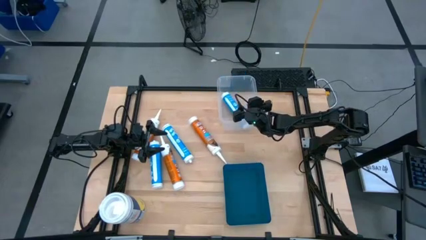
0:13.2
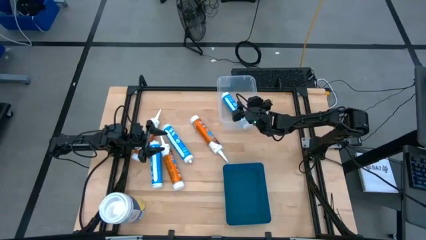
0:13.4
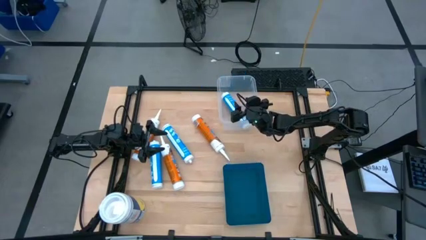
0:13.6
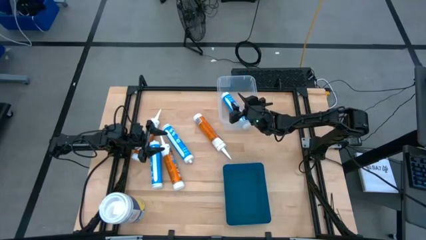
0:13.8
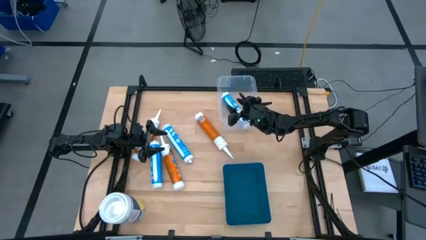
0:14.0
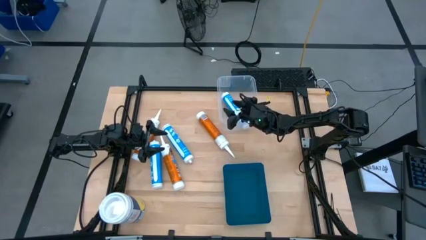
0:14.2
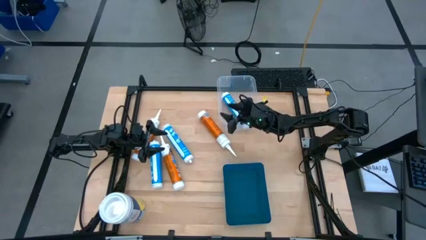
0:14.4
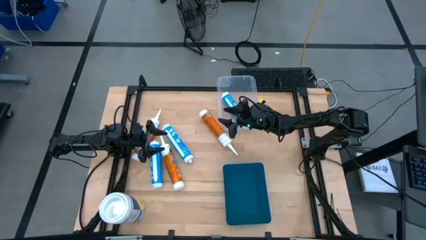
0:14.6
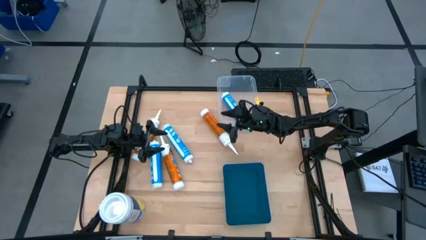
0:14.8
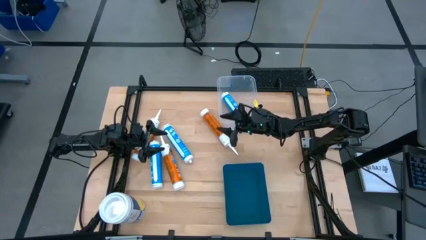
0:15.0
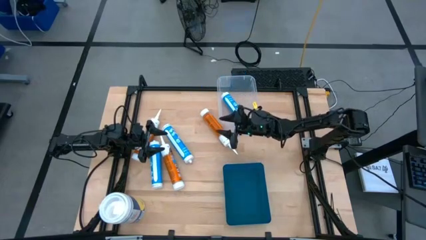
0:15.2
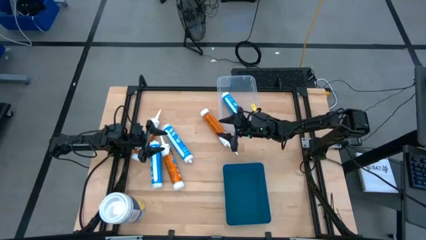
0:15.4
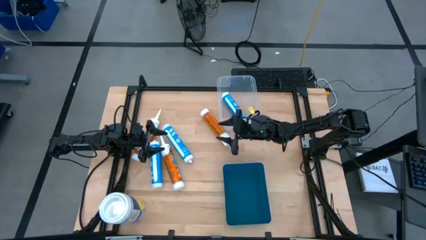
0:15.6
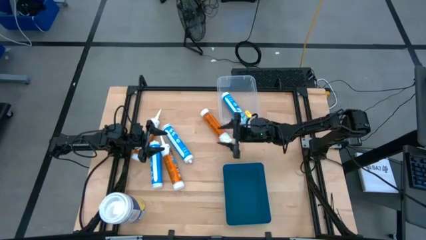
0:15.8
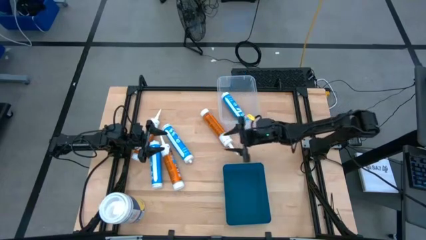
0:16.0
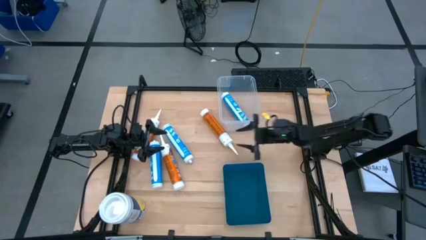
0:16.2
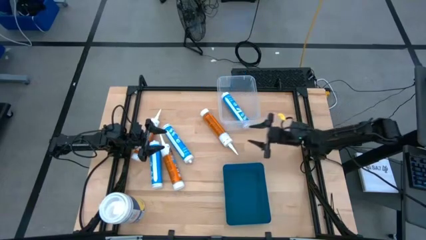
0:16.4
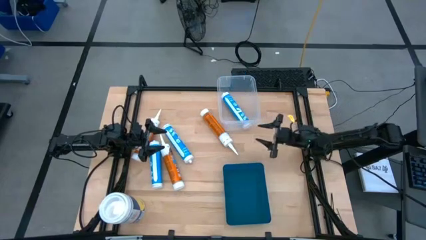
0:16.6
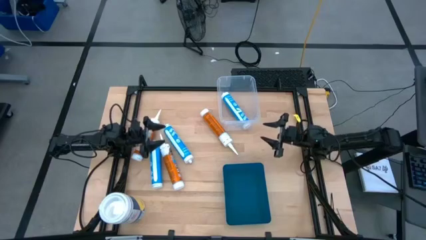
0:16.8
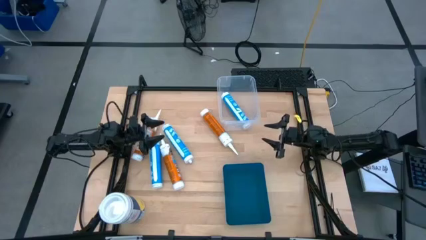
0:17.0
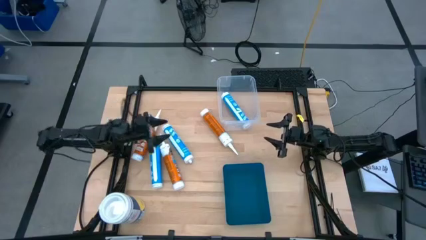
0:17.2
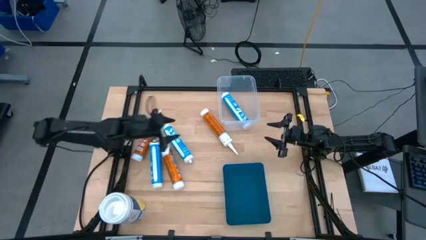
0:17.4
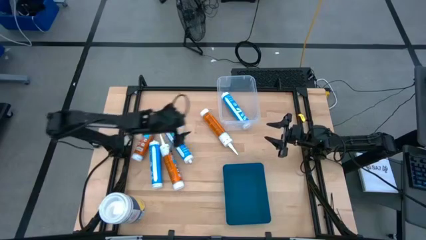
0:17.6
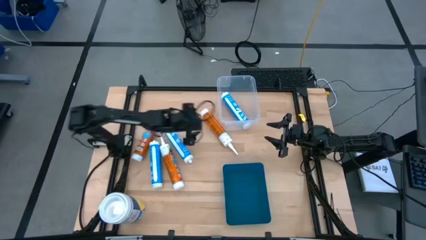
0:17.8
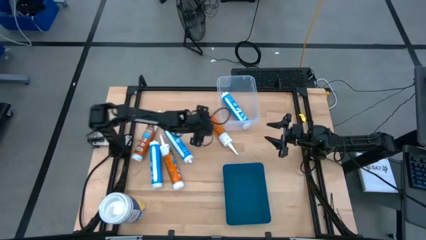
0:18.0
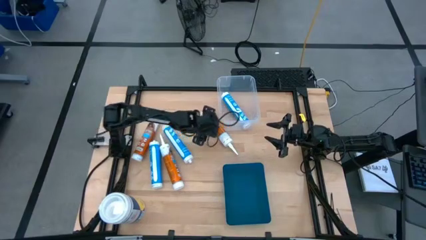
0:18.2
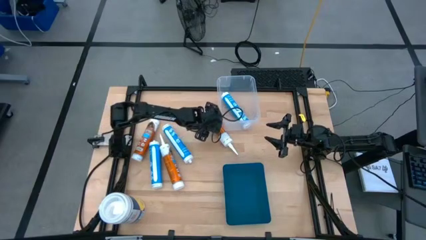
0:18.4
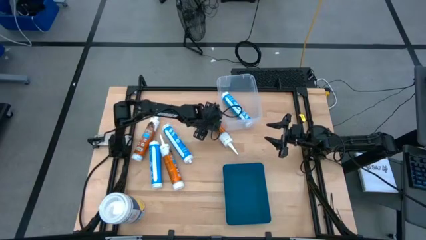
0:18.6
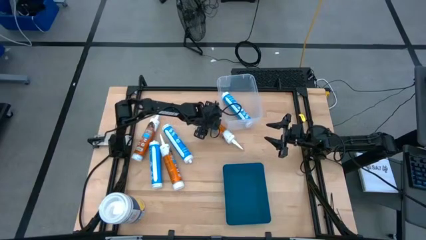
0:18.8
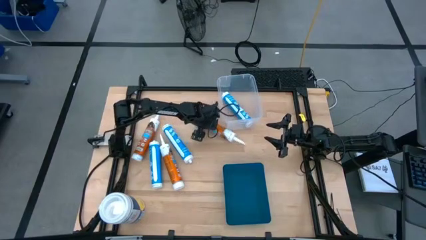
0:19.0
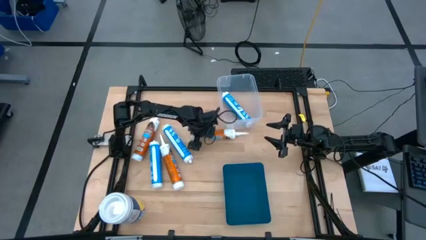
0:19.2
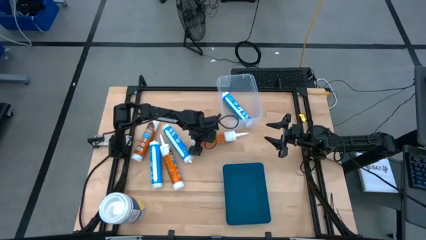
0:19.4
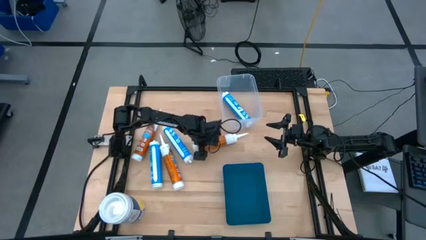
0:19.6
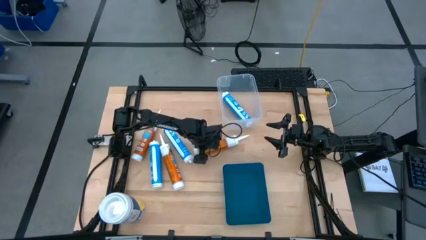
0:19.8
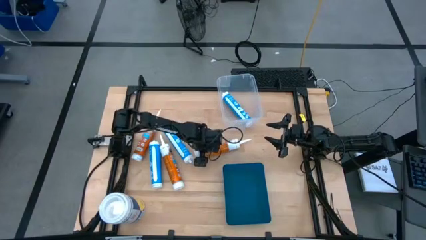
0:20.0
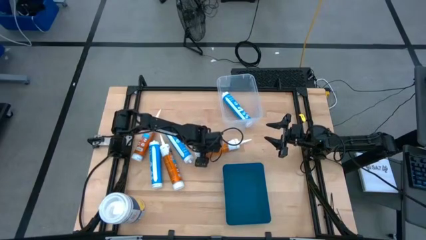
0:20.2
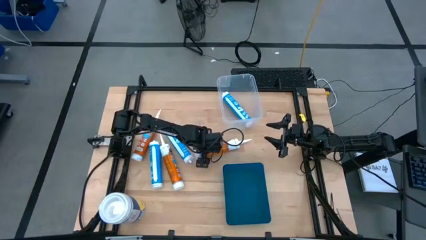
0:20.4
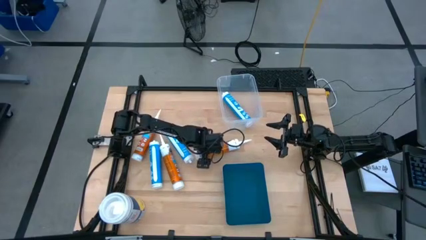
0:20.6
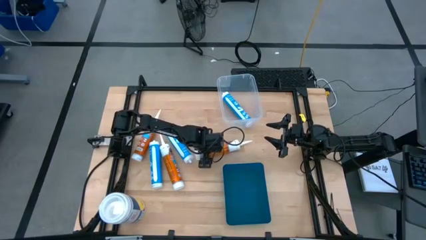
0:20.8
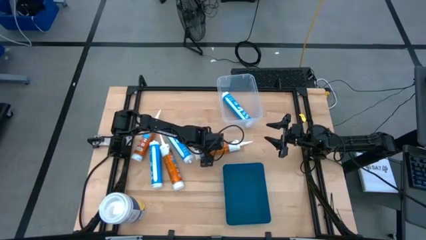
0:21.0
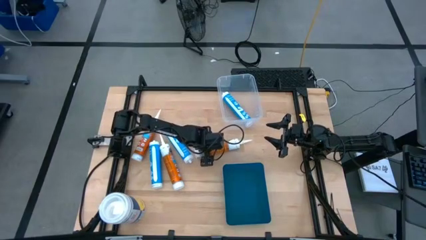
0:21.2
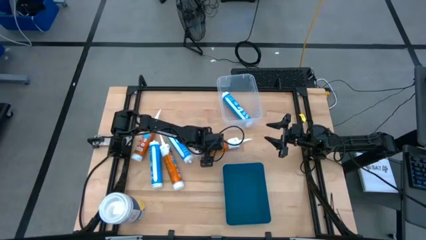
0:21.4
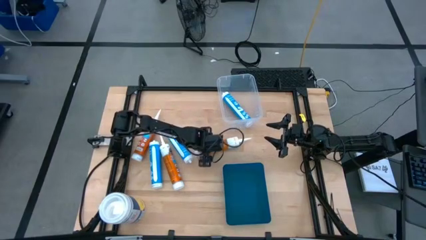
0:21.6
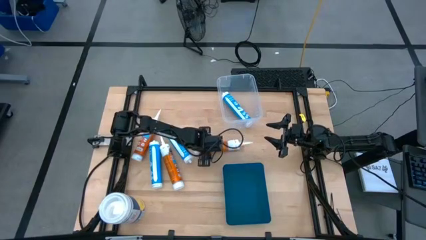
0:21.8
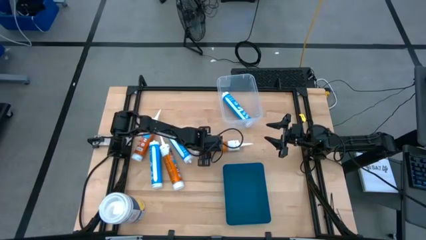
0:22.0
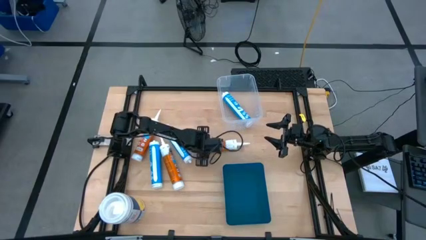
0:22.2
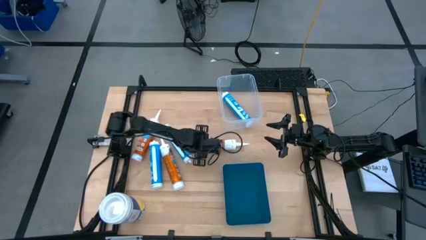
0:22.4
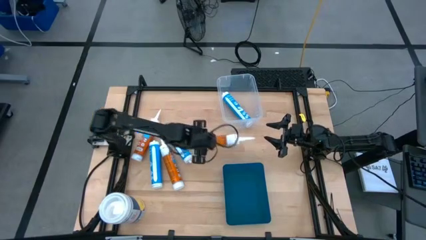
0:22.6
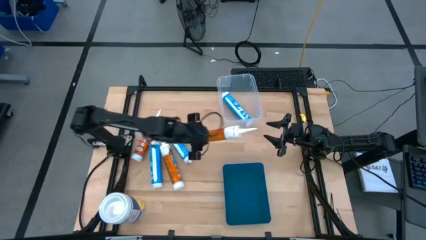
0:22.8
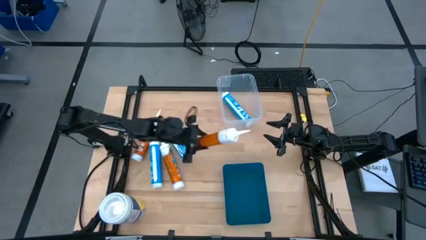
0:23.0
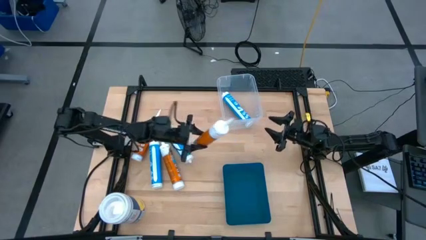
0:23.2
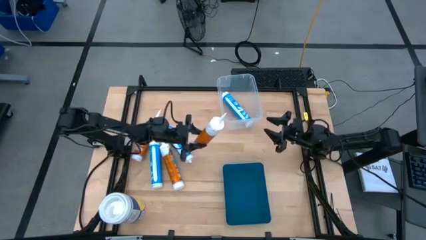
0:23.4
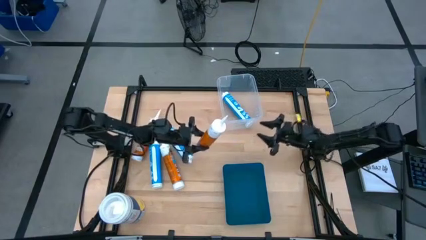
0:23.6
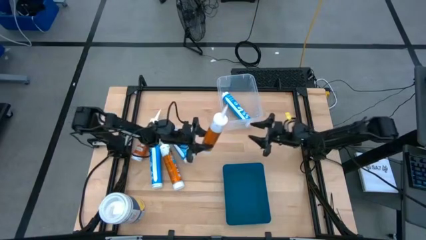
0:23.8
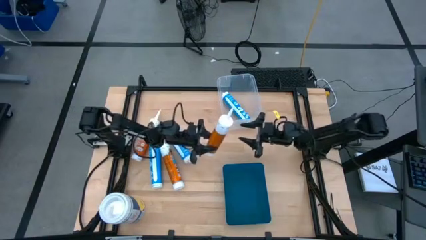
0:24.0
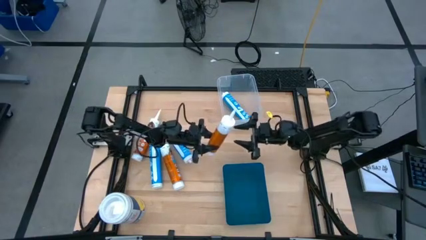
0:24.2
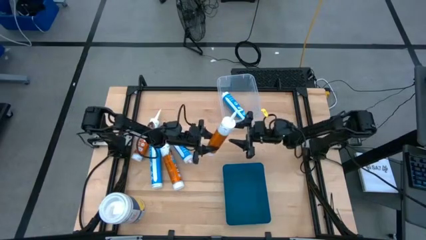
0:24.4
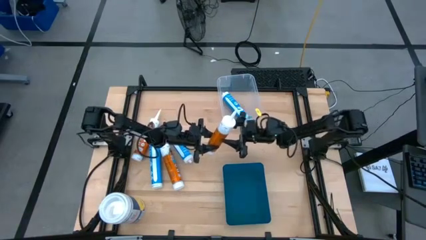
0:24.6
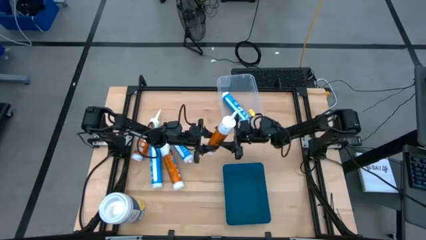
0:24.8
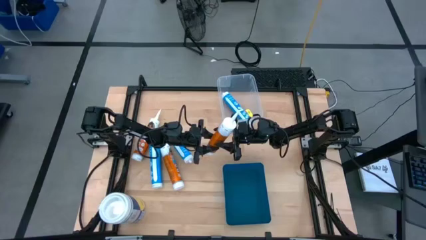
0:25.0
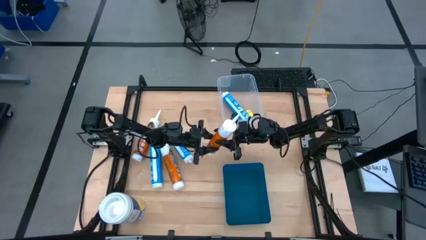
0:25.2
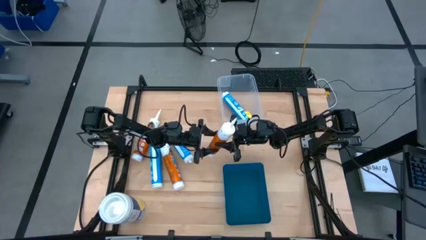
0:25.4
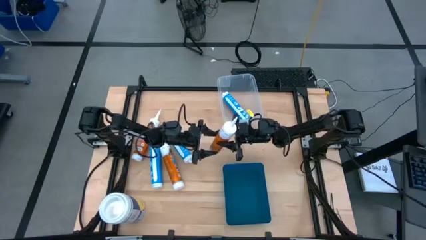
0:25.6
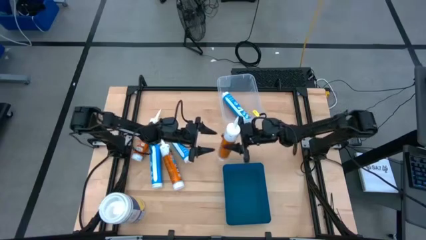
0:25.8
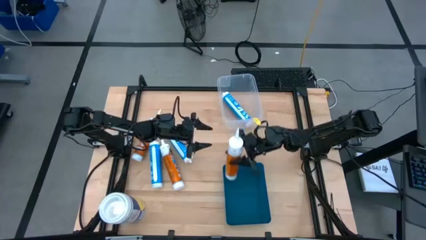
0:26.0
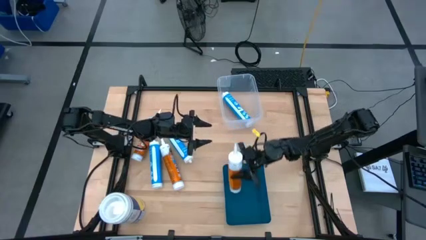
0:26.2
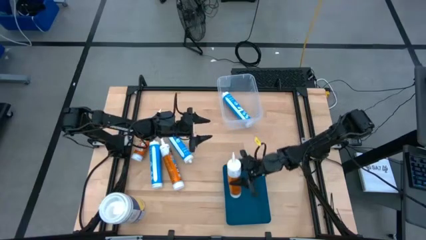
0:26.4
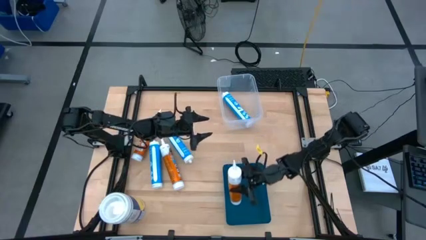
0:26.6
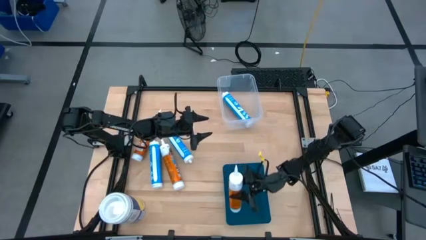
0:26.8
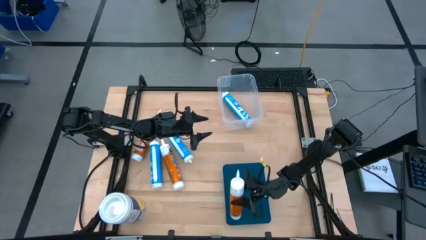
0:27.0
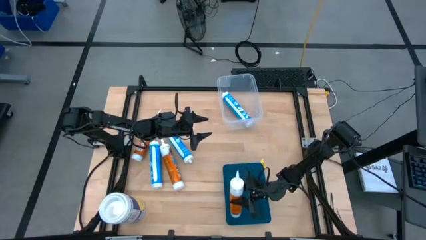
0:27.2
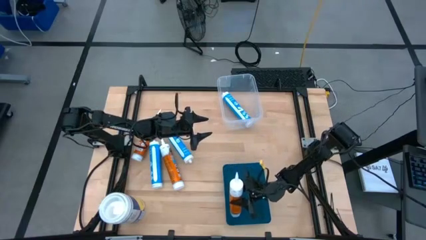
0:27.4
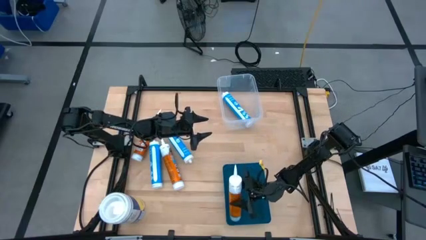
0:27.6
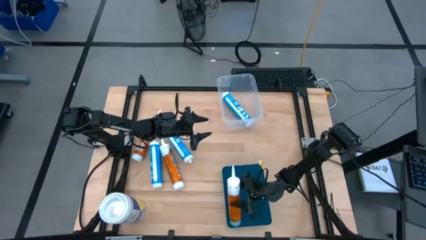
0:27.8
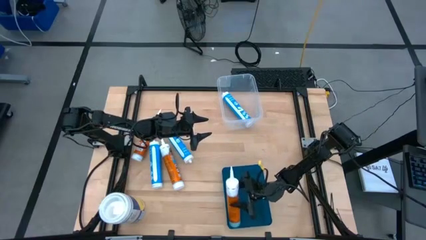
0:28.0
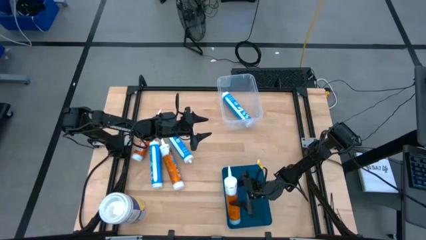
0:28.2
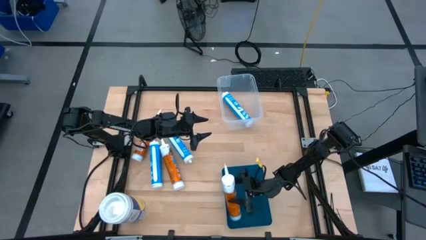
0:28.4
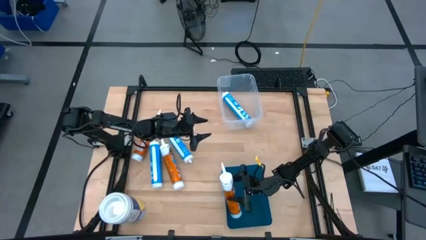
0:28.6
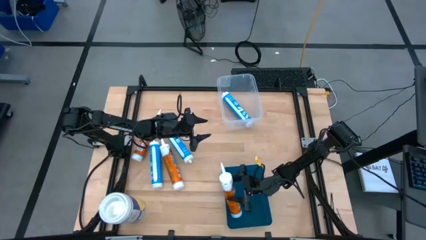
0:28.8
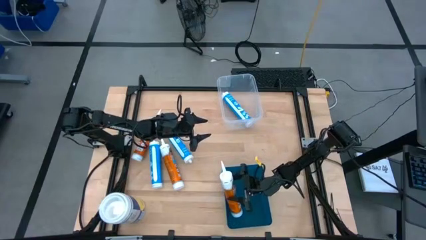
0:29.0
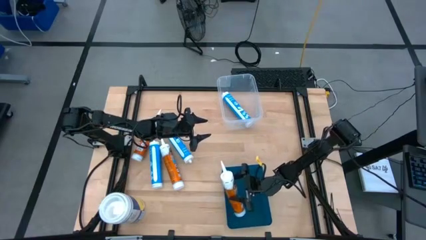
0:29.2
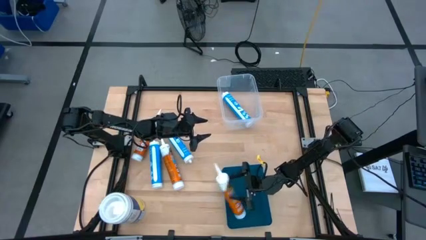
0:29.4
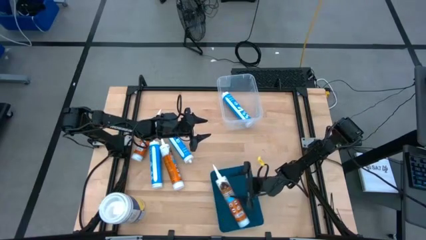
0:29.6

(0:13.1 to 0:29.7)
Task: Sort silicone sealant tubes
Put the right orange sealant into the blue bin
